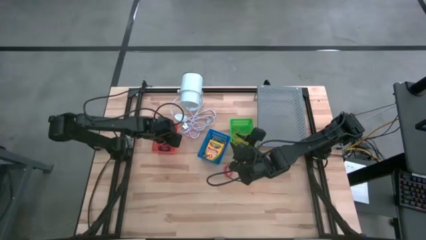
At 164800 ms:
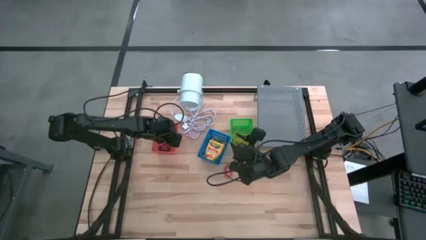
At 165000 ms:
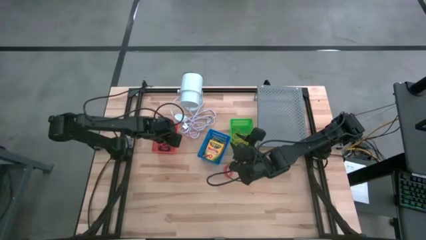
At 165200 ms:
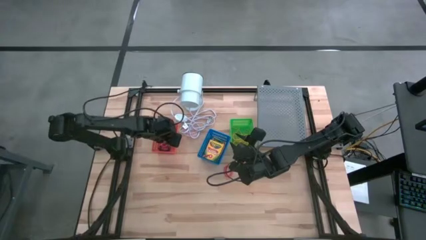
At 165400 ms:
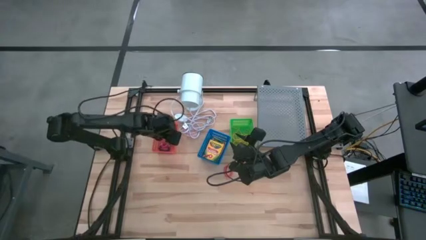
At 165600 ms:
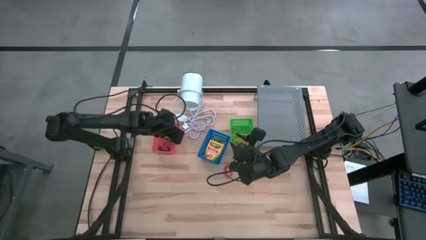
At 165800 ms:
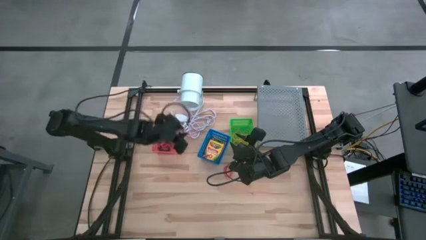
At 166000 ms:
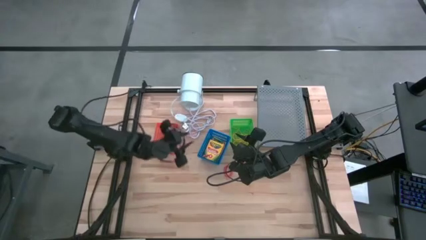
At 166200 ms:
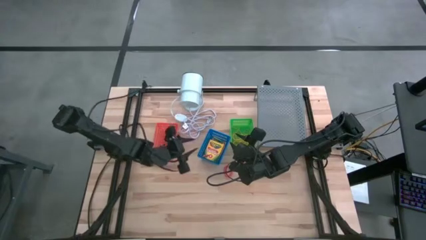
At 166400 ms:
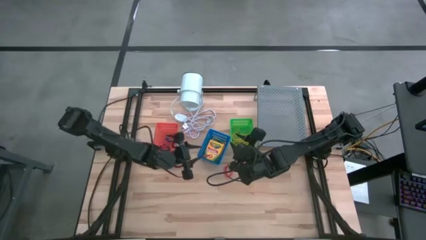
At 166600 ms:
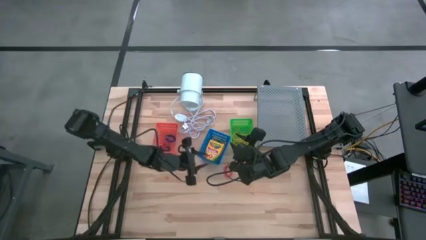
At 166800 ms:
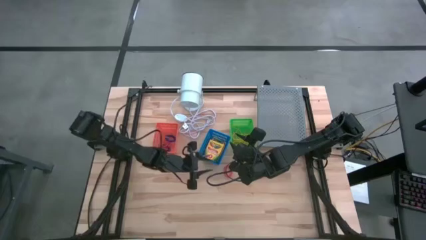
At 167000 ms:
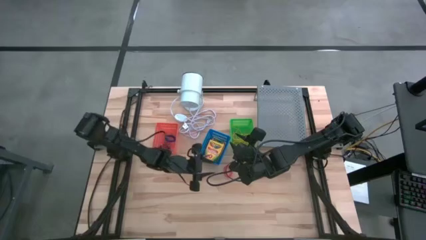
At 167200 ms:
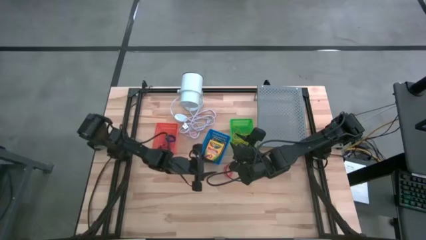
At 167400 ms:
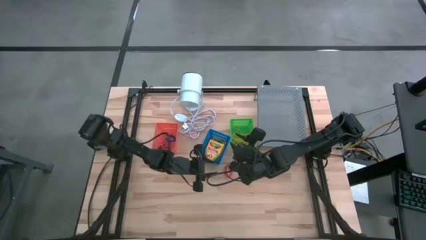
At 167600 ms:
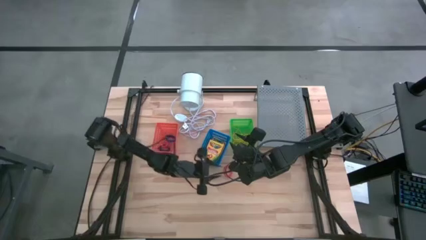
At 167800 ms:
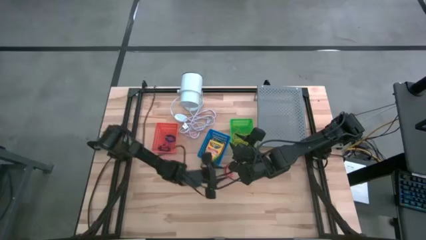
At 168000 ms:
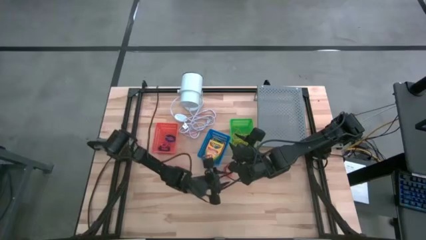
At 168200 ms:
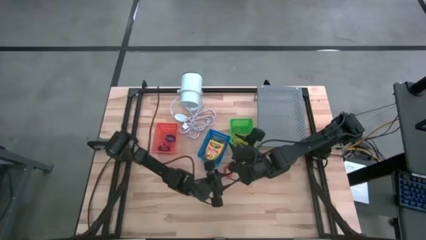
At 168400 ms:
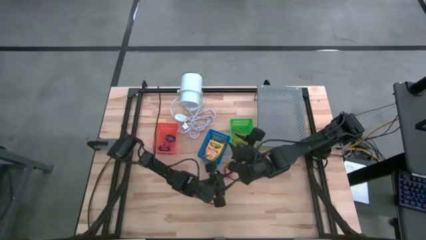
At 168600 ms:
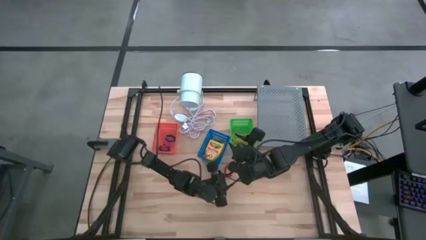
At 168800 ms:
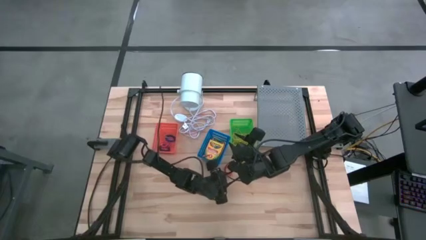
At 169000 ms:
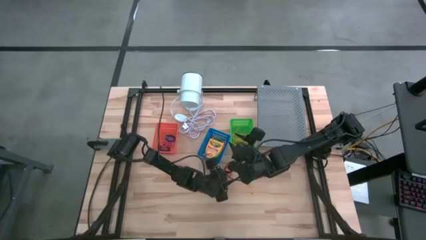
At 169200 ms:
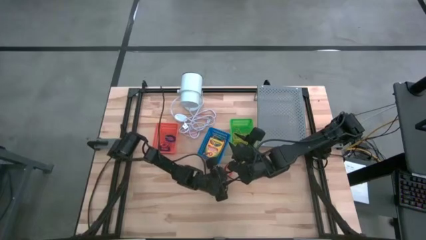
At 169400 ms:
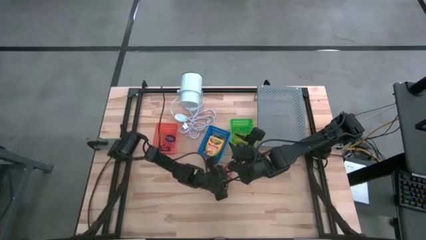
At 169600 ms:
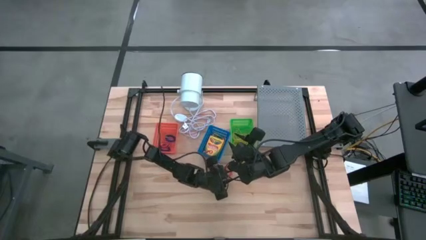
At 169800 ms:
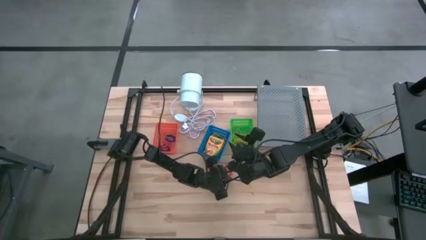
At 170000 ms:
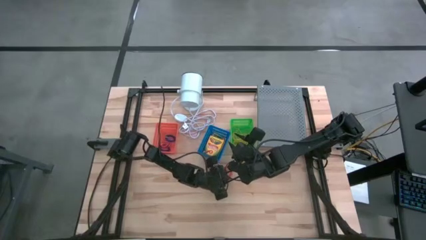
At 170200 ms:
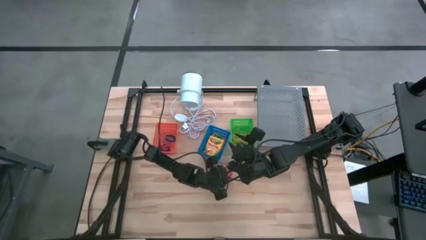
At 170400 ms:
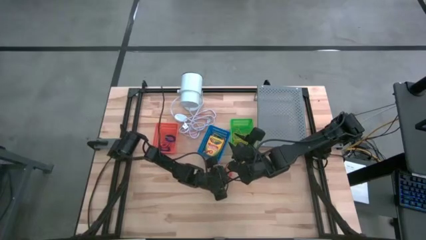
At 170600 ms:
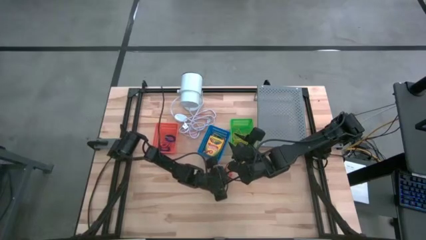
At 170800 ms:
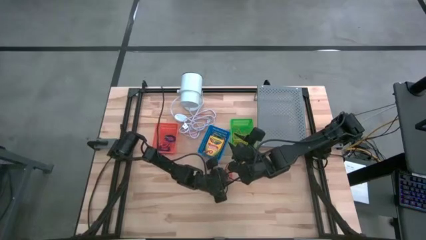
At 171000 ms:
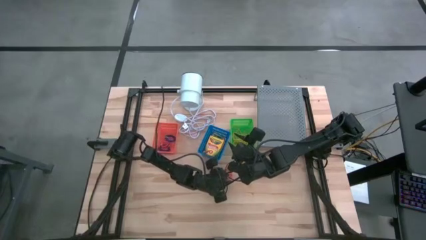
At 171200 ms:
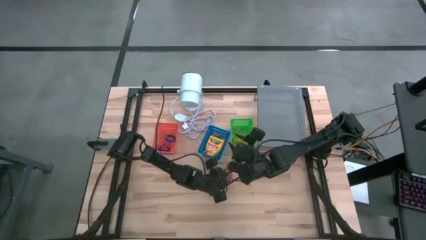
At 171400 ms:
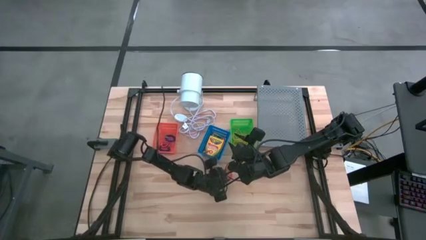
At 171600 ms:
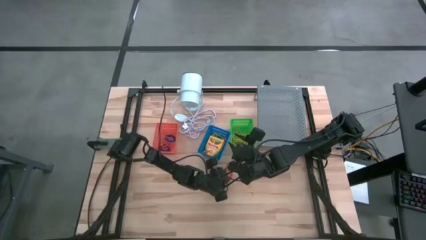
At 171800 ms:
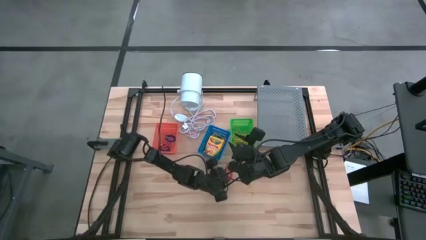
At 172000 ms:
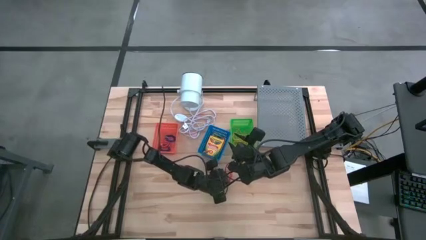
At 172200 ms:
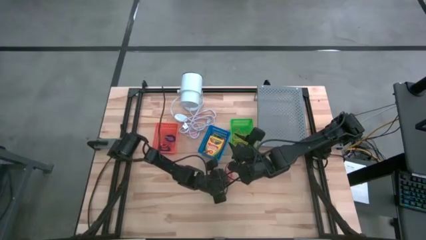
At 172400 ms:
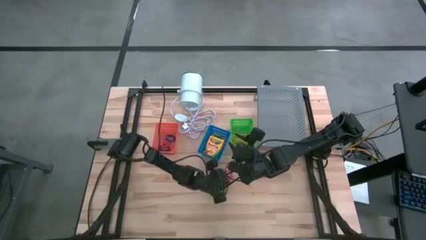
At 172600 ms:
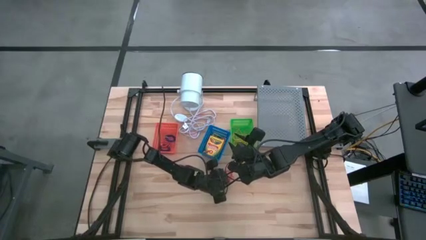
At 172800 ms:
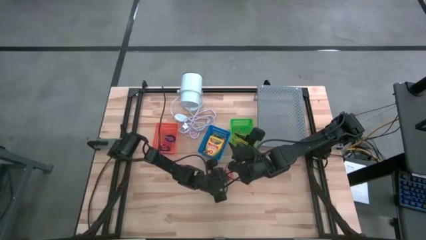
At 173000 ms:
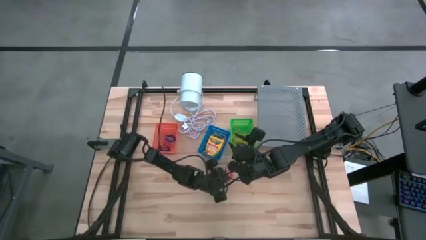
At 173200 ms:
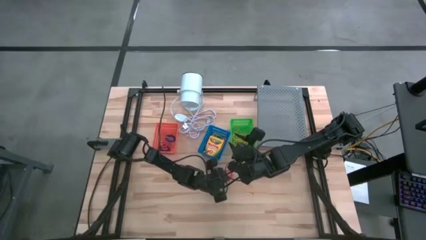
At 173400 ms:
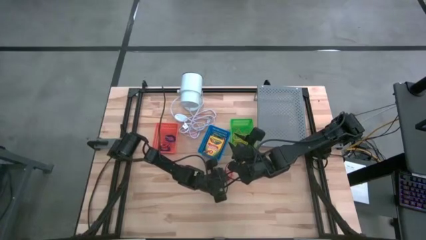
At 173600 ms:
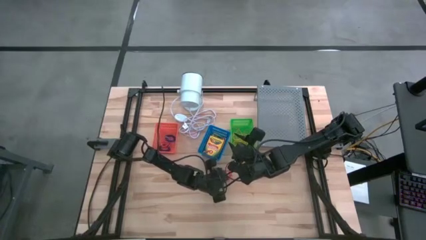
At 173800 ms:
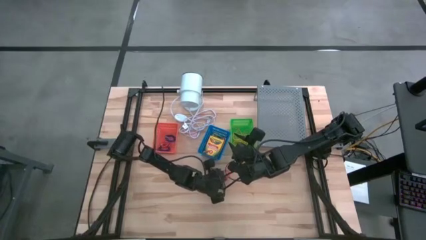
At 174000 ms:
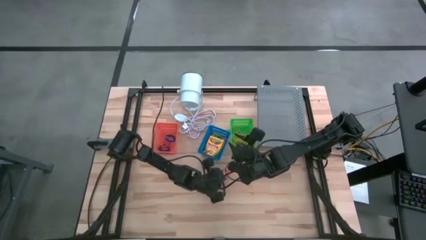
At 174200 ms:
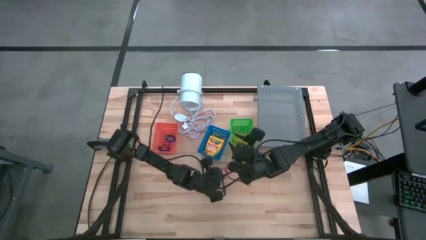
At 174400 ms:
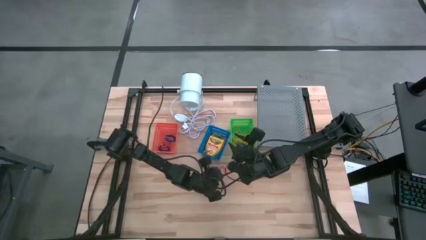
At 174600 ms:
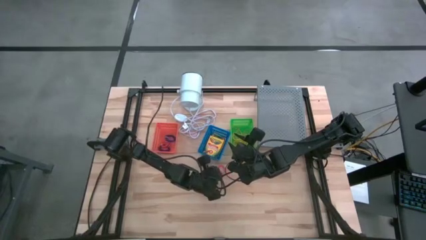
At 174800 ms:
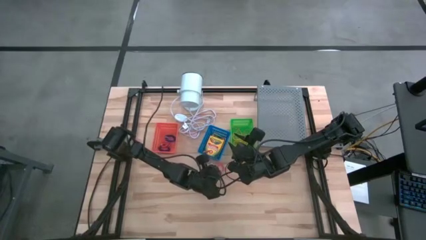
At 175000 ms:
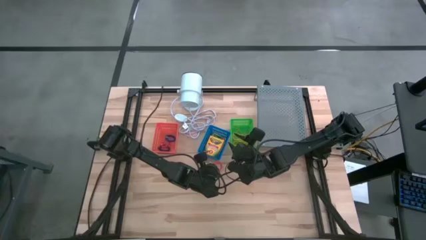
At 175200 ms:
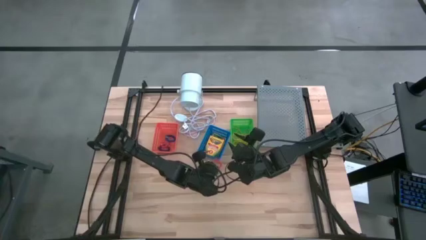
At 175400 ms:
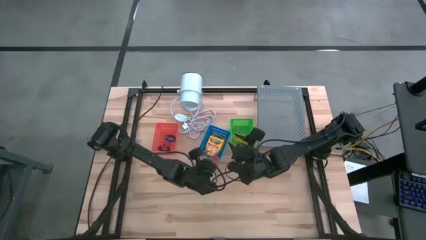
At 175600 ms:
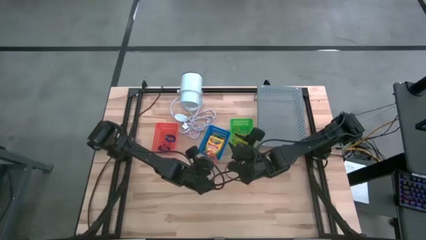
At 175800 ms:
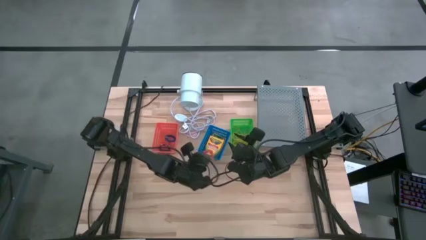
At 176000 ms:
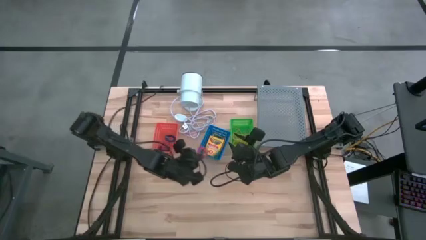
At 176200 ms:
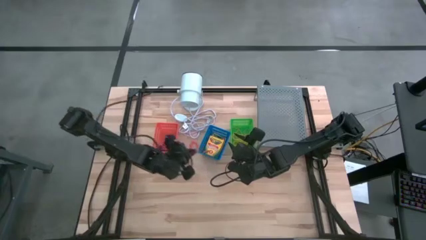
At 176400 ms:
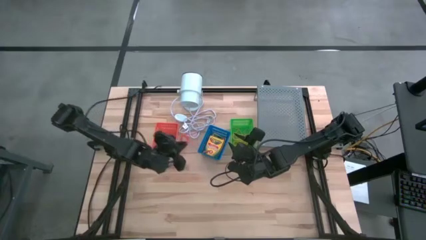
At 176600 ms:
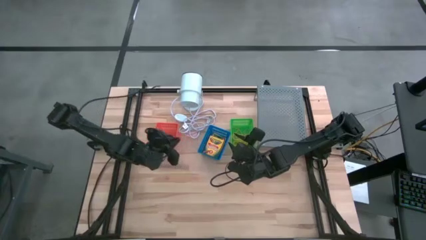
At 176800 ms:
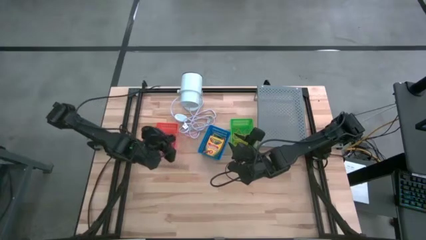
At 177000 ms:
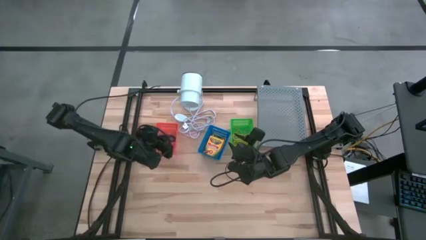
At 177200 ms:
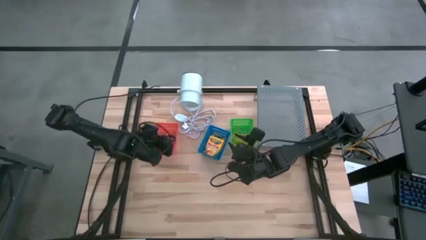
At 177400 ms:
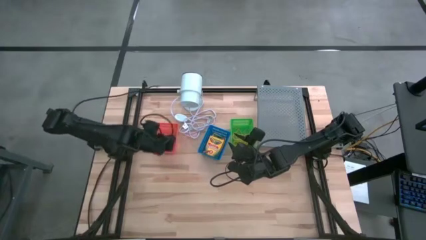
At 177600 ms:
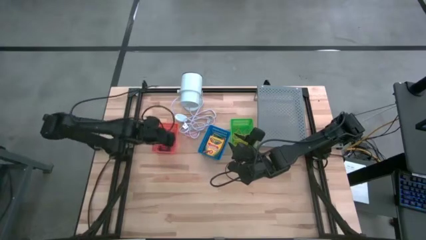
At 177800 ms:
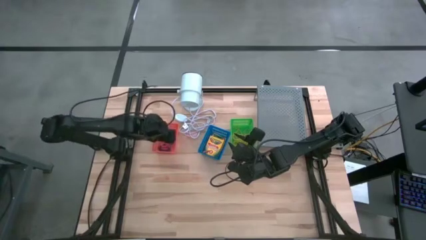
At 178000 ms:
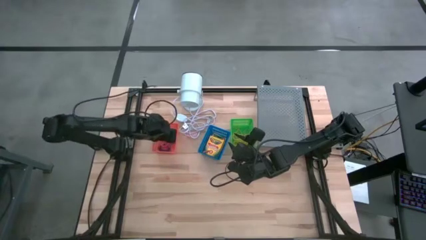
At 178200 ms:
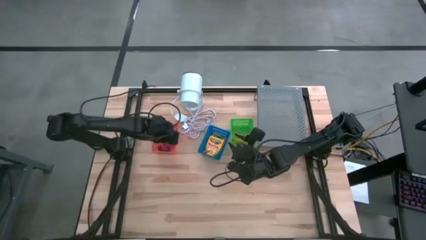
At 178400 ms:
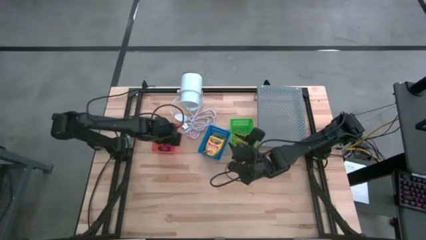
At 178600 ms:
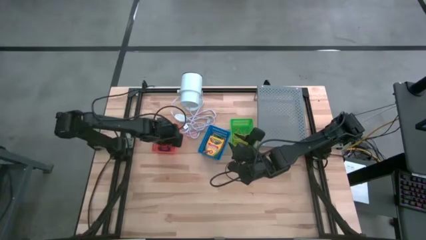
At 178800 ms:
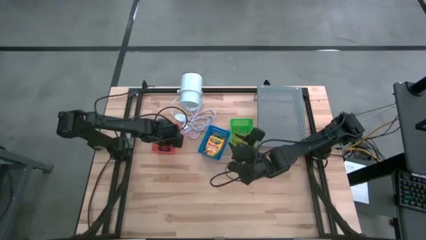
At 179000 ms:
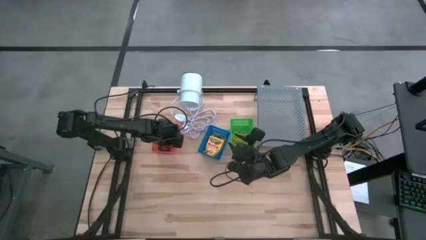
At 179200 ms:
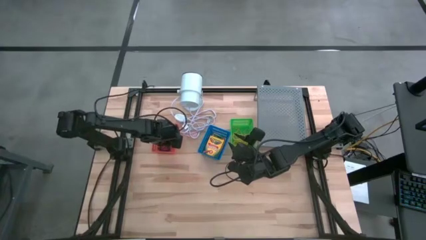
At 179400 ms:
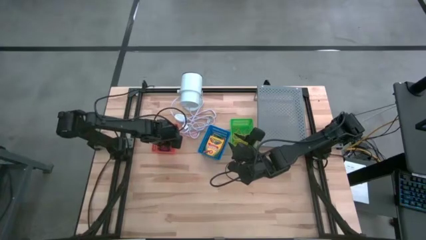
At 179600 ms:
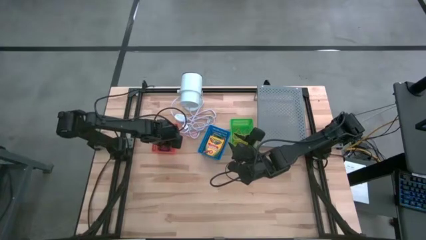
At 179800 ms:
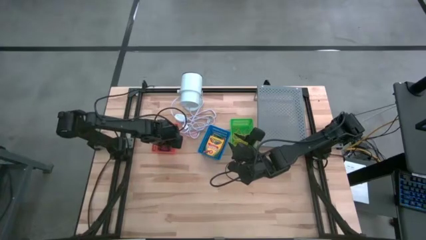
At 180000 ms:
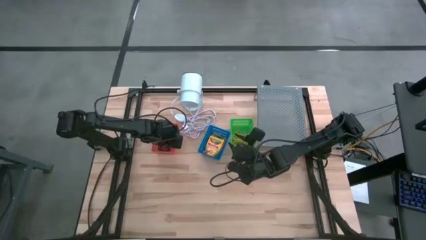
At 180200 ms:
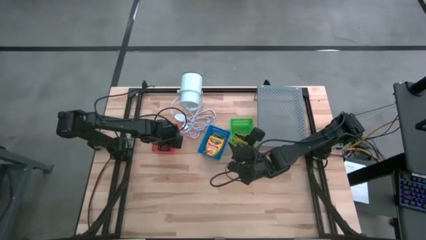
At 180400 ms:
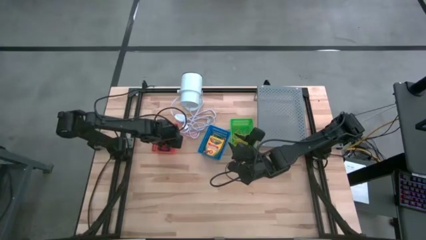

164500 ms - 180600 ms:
Task: Pick & Place Office Desk Supplies
Put the orange spring keychain into the orange bin
